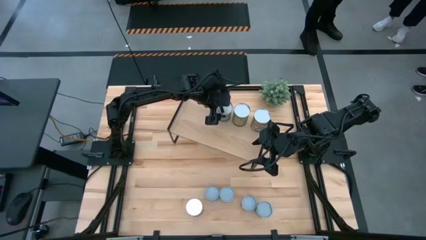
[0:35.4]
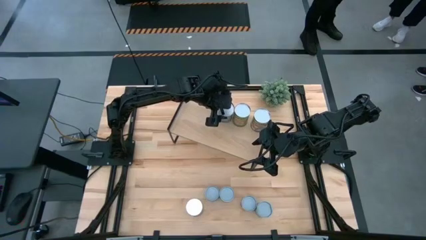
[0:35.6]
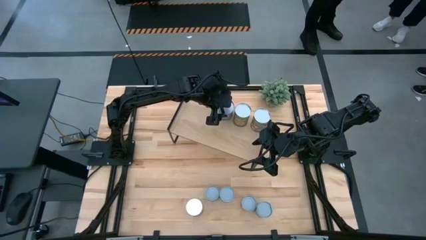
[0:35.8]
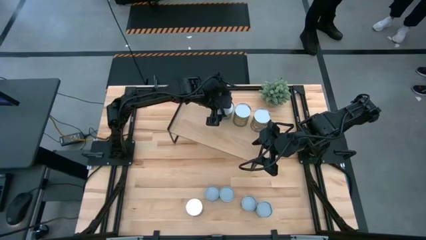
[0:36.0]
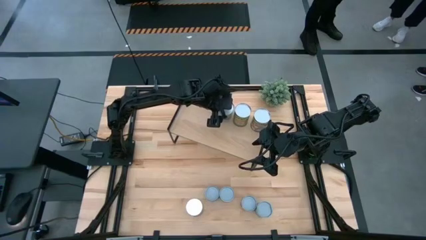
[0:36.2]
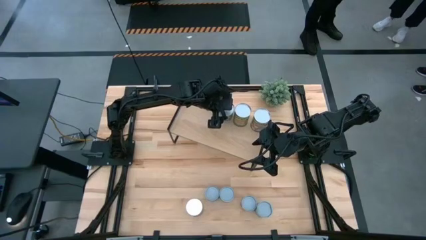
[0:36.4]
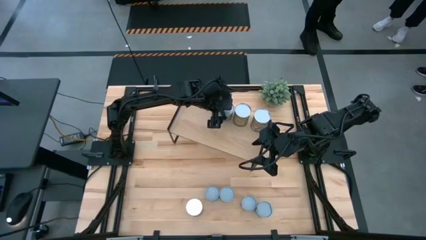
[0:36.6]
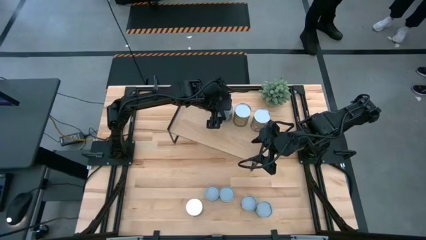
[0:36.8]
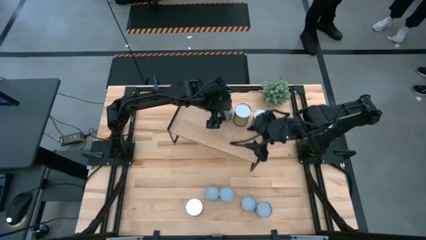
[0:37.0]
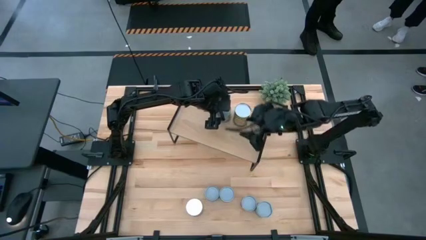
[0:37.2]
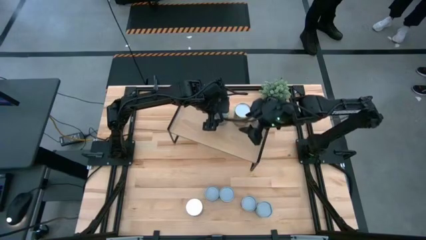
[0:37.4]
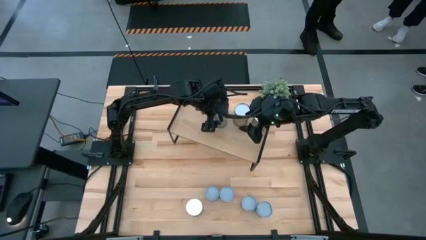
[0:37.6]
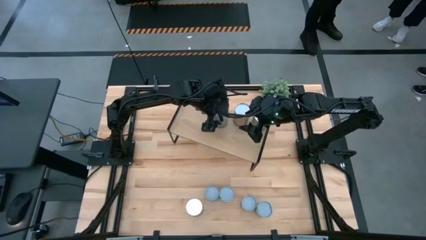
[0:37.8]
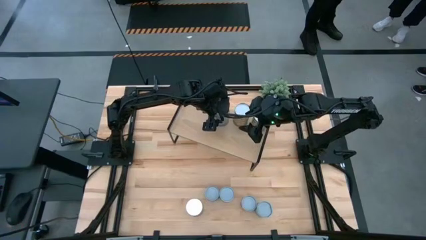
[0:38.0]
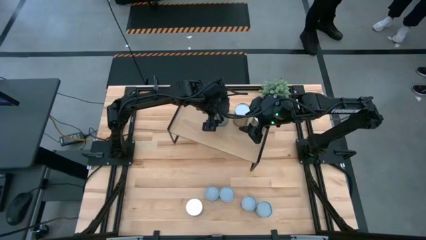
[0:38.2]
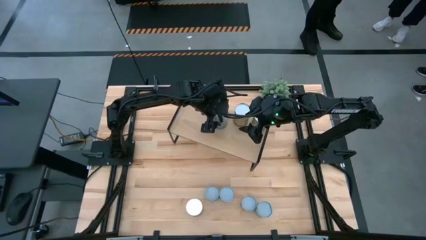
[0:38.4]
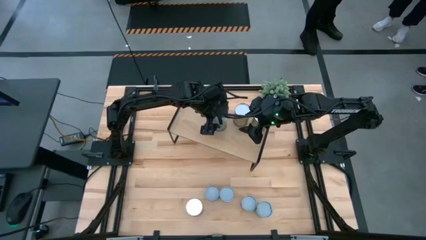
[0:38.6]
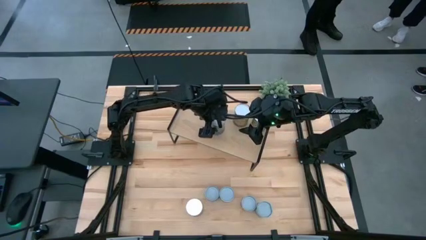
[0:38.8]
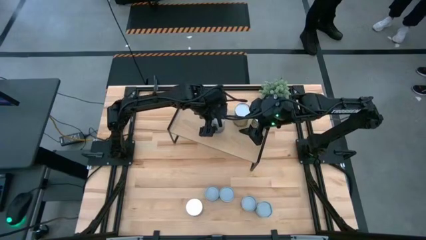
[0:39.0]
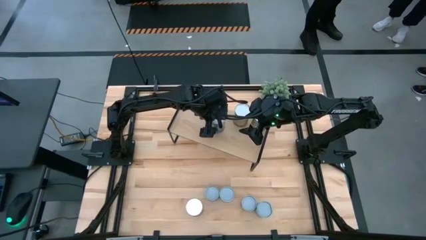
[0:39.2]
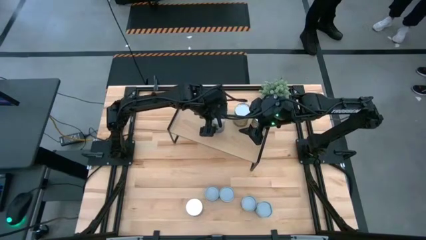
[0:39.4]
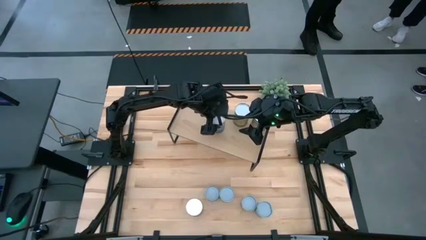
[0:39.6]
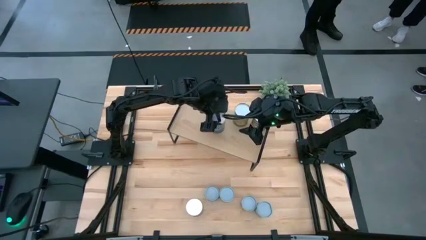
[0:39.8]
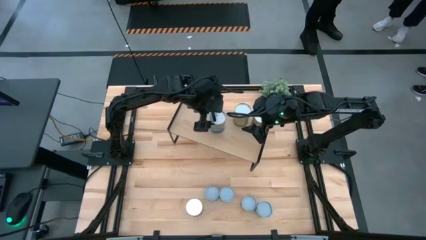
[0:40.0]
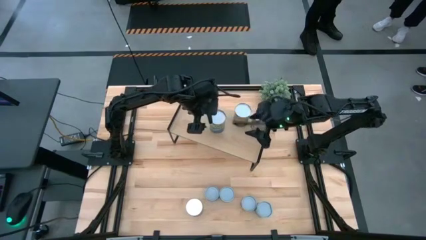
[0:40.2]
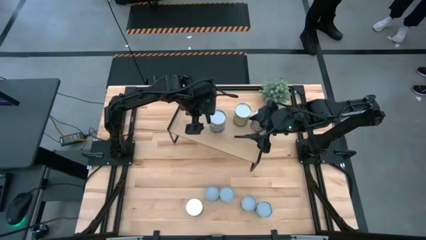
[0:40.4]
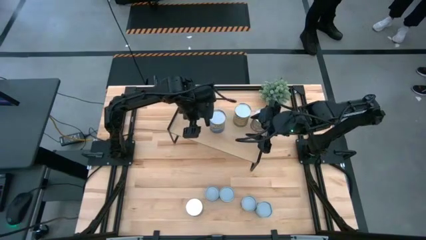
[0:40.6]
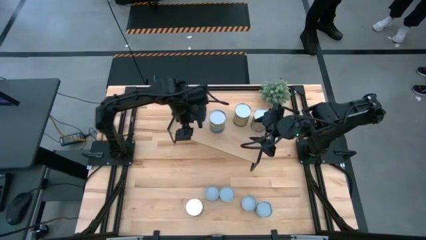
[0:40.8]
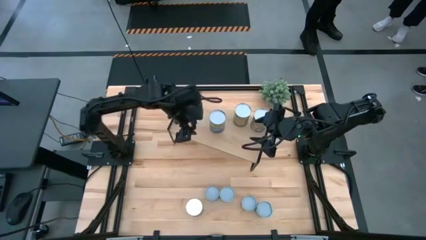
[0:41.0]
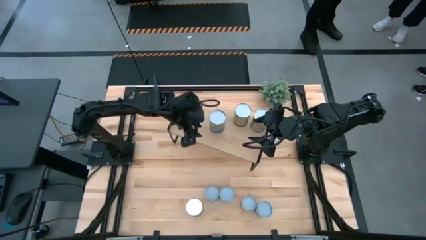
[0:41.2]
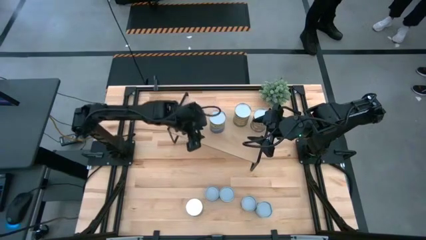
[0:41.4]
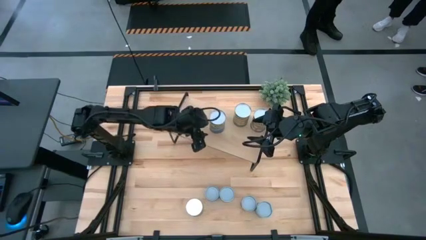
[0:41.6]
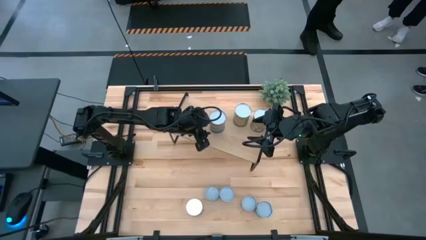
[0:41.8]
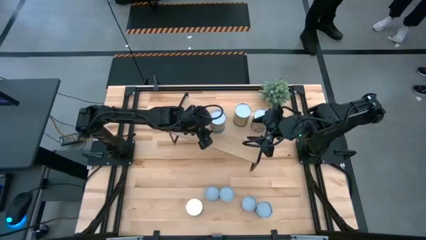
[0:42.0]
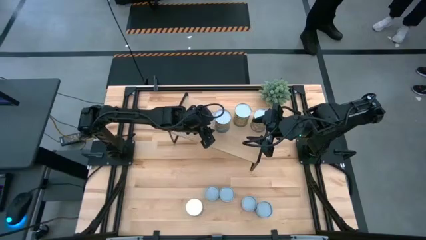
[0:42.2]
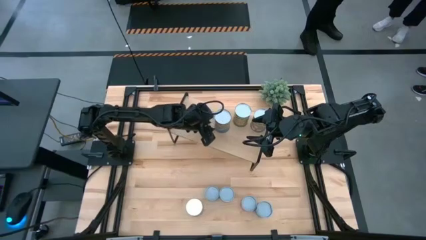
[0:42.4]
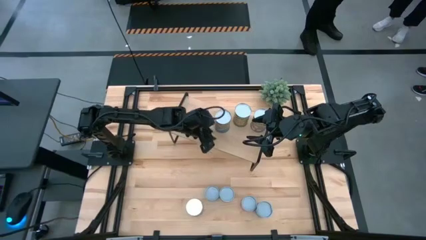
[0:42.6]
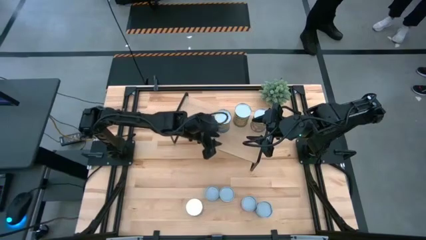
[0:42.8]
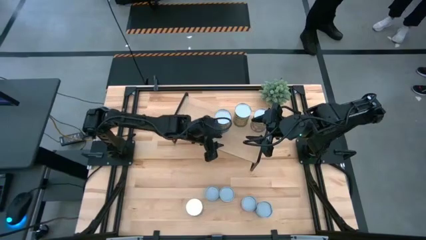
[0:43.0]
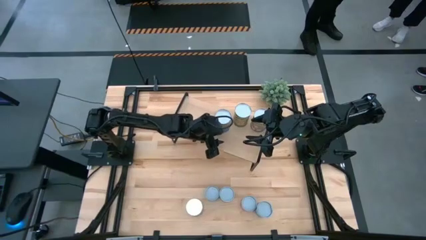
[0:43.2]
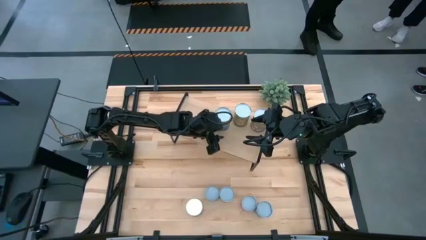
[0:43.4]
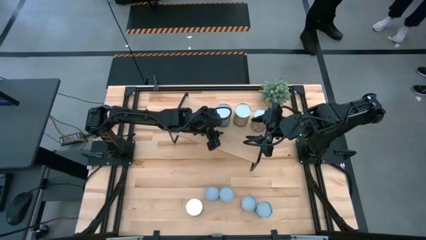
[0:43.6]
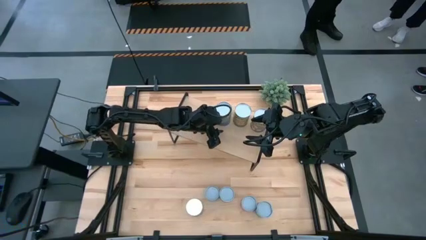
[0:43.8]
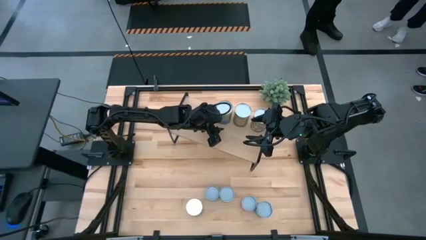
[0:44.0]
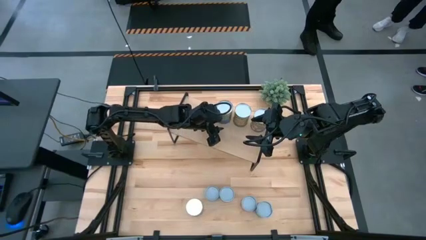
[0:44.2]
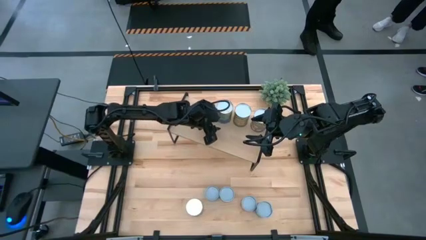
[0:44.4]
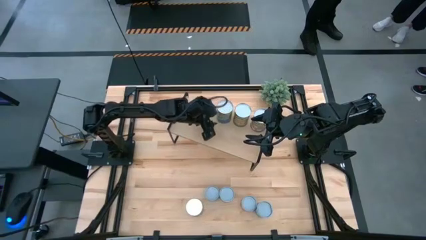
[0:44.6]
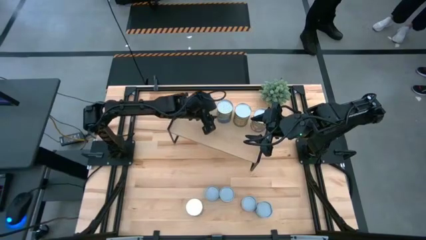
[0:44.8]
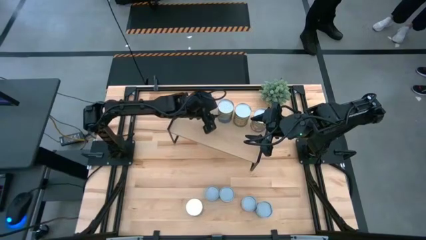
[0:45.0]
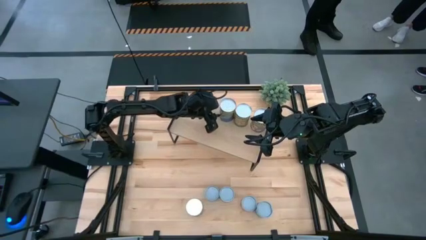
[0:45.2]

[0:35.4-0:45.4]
Task: Pick and place cans onto a shelf
Put the canned peas on the shelf

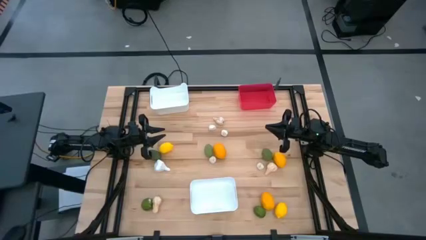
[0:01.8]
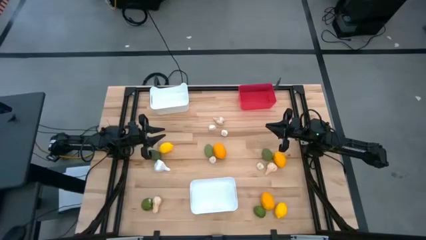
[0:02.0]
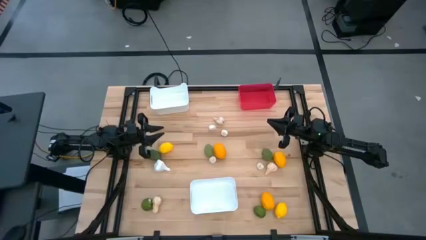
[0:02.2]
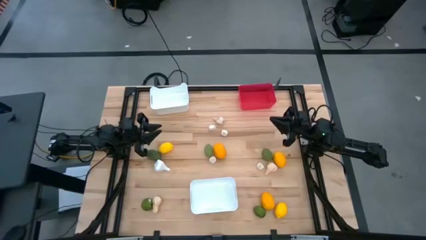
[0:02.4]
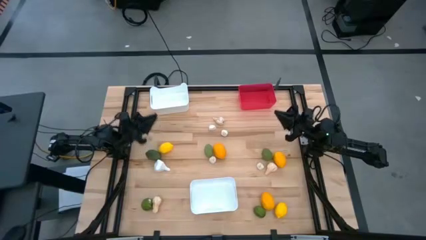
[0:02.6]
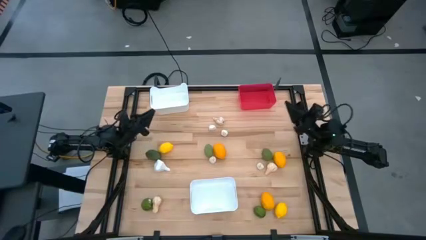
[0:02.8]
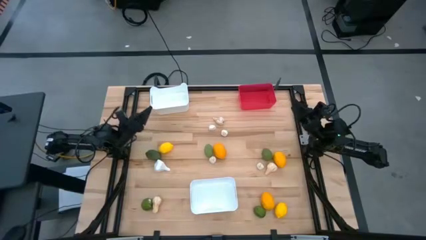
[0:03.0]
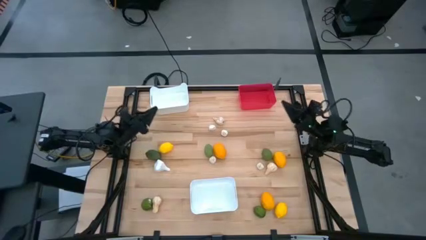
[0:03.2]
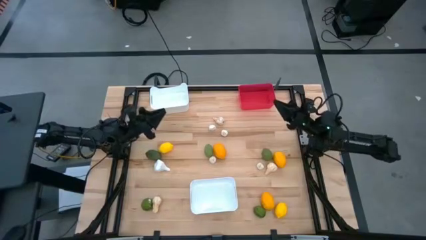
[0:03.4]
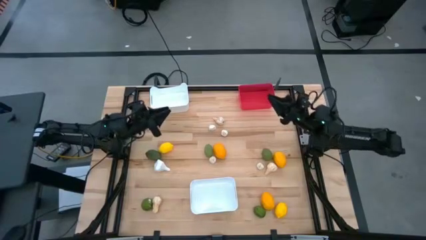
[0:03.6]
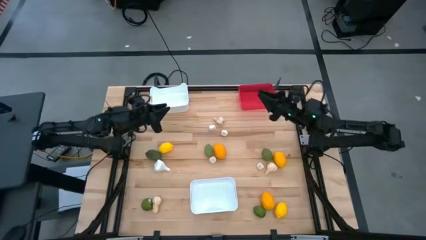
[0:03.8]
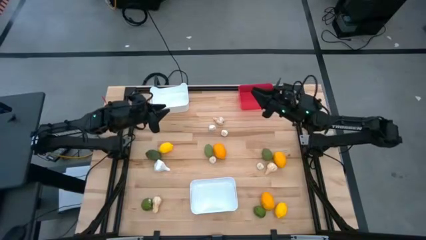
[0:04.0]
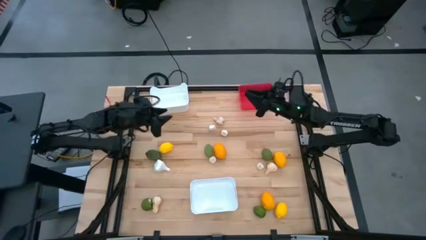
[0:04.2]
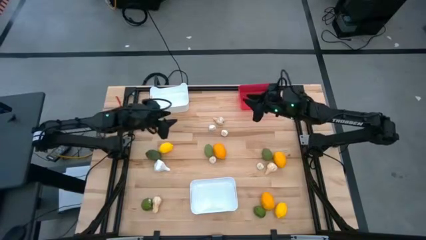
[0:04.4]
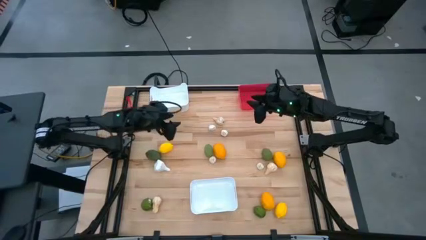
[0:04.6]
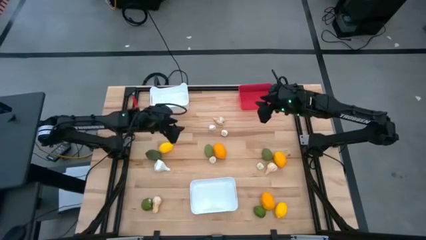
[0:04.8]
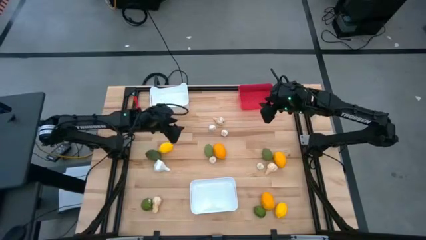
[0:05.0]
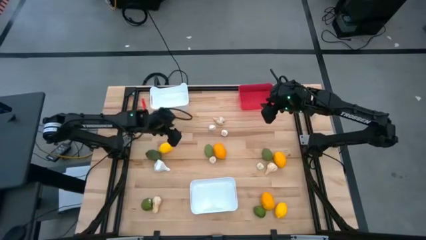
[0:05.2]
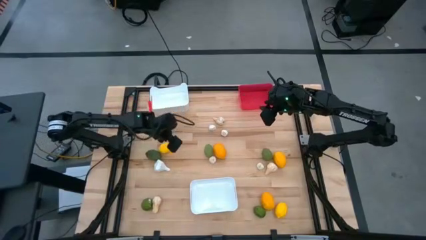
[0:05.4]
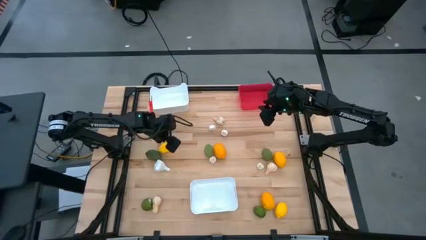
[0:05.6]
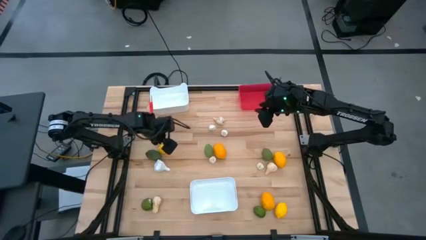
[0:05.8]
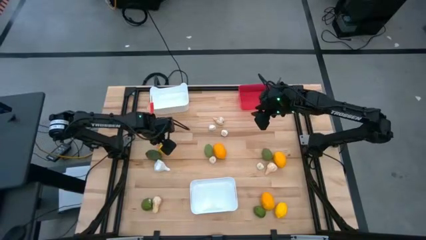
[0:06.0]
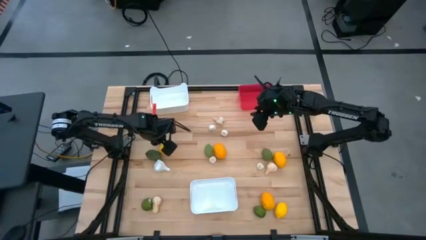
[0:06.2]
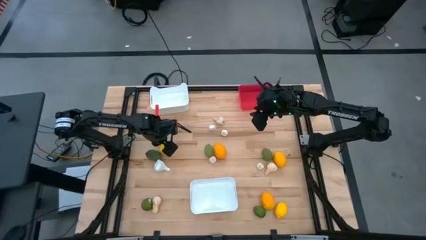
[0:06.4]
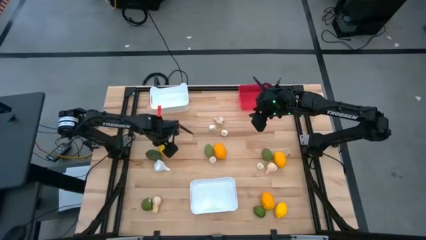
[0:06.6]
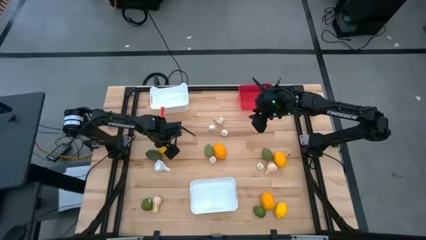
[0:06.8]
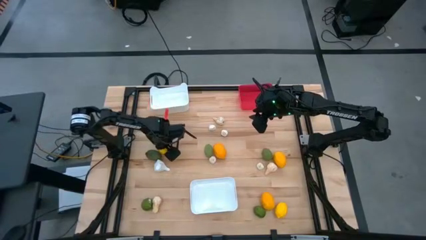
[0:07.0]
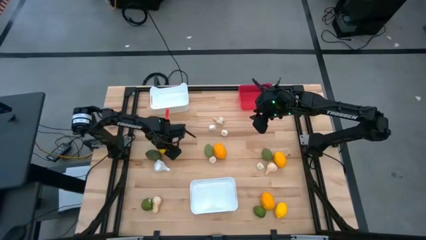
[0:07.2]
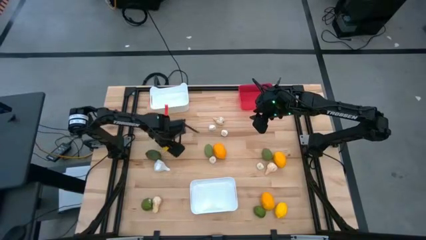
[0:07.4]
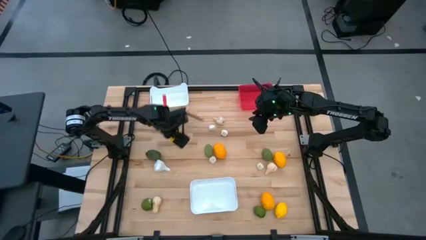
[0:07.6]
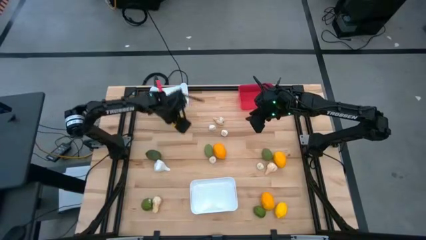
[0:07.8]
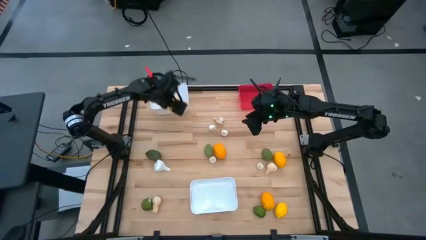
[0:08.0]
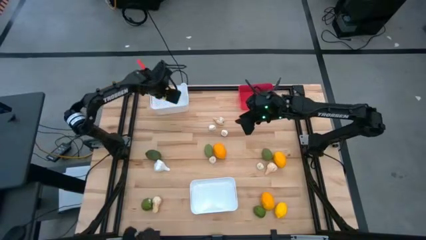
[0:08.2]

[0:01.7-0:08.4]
Task: Sort produce into baskets
Put the yellow lemon into the top white bin
